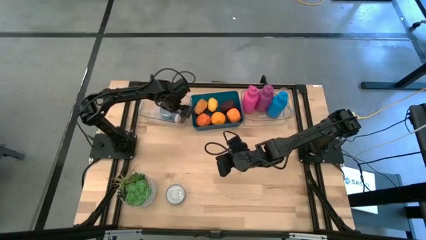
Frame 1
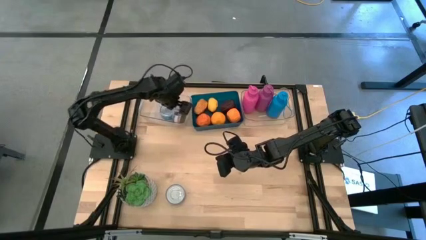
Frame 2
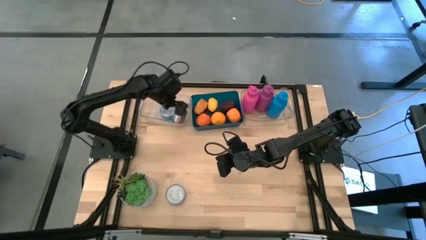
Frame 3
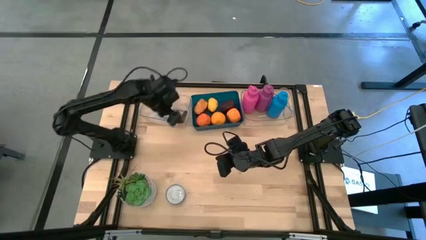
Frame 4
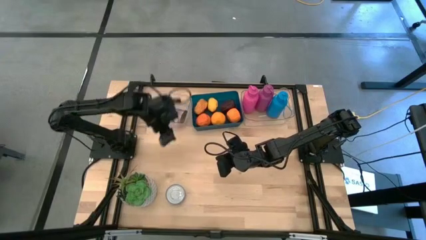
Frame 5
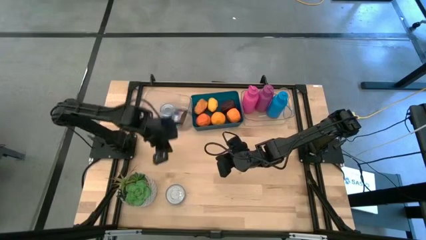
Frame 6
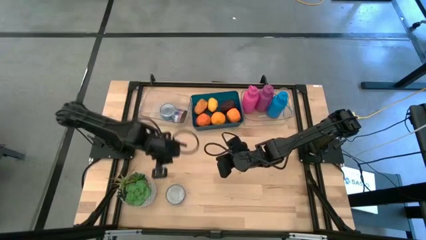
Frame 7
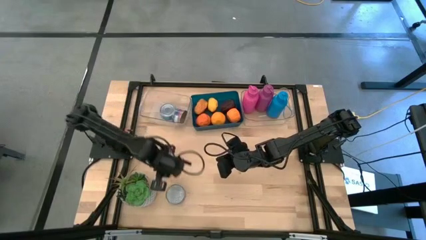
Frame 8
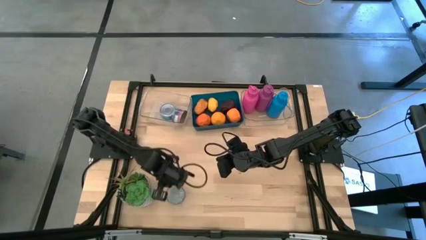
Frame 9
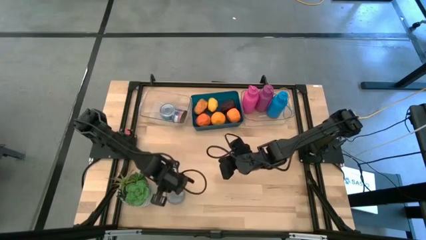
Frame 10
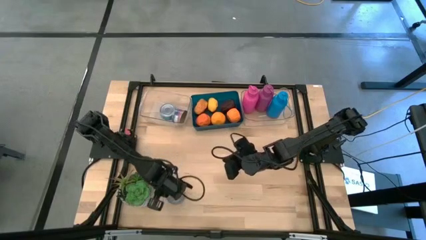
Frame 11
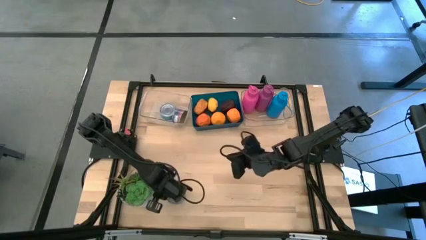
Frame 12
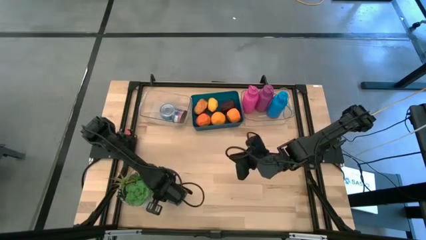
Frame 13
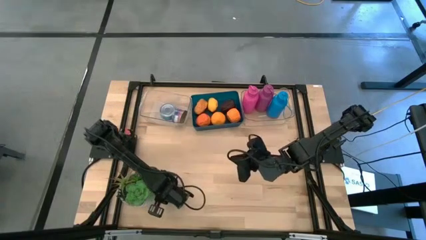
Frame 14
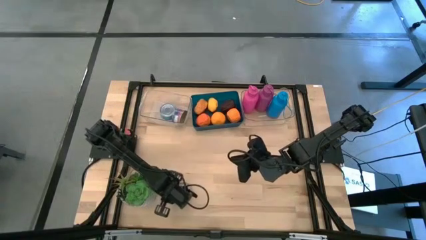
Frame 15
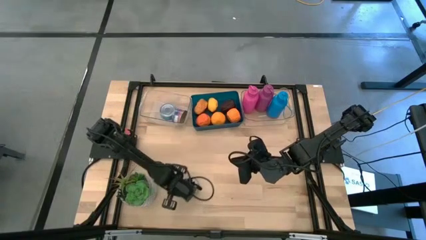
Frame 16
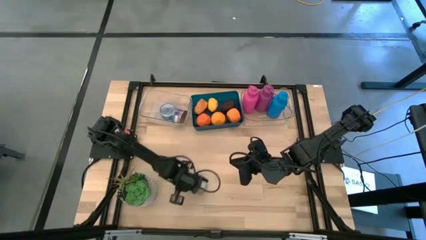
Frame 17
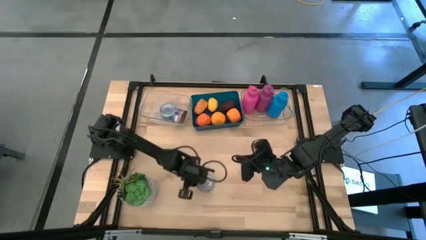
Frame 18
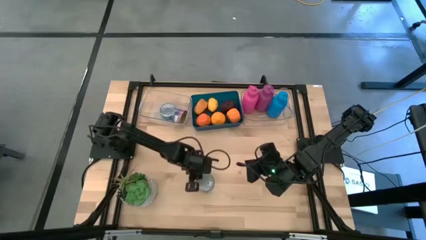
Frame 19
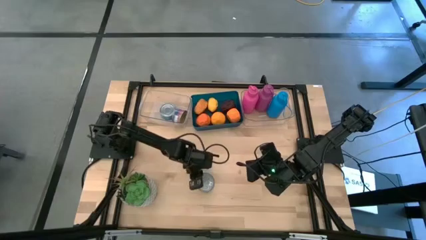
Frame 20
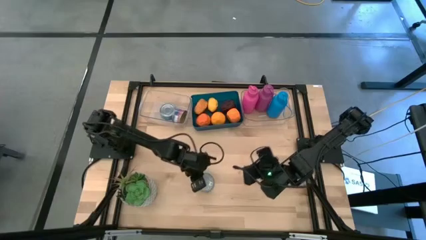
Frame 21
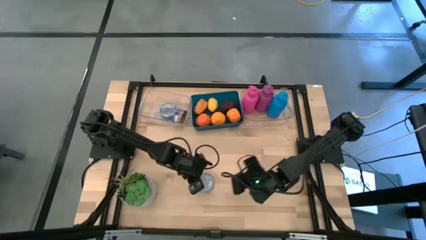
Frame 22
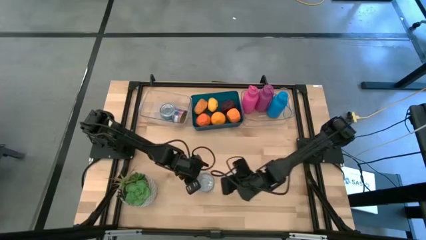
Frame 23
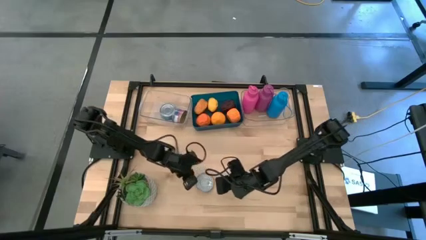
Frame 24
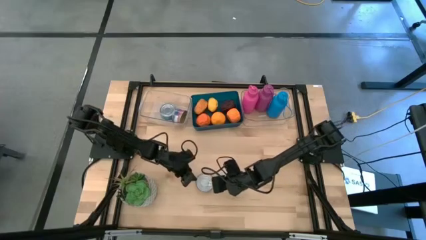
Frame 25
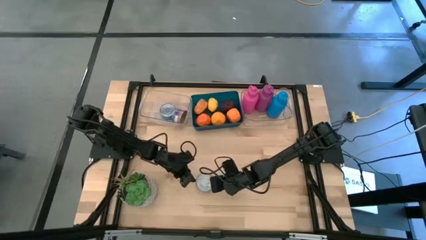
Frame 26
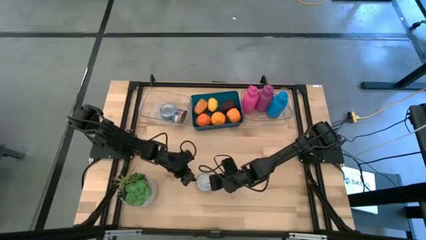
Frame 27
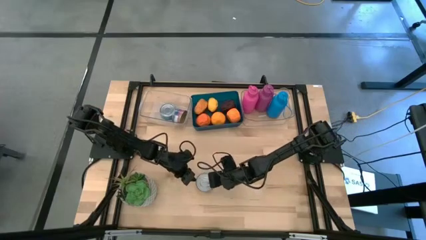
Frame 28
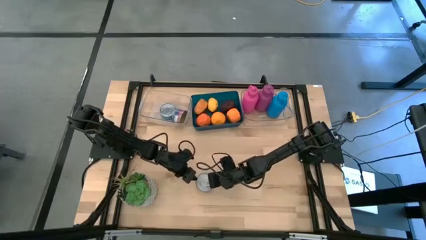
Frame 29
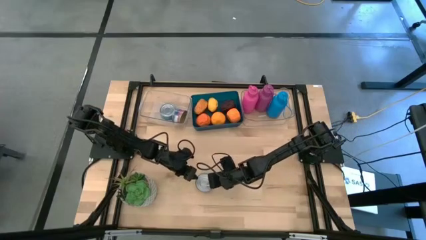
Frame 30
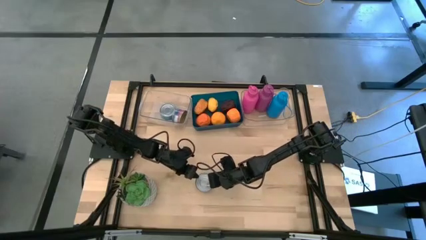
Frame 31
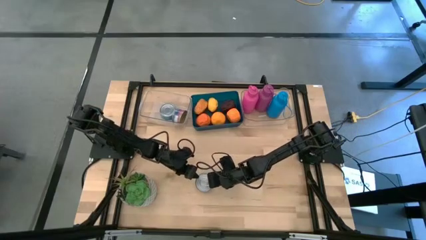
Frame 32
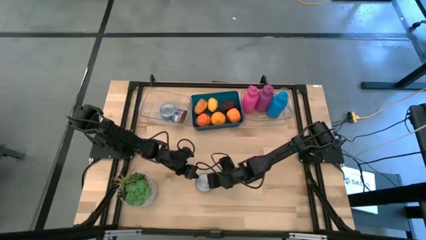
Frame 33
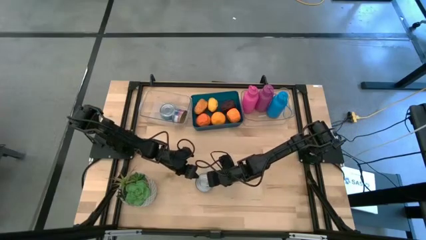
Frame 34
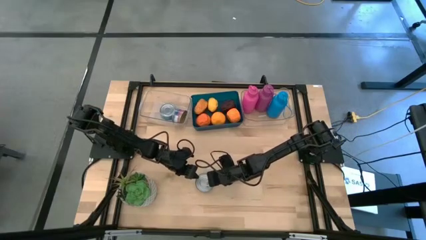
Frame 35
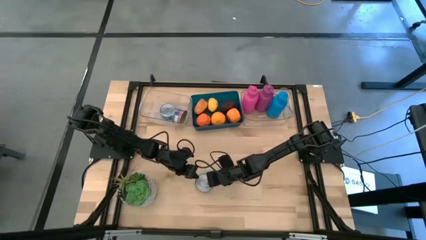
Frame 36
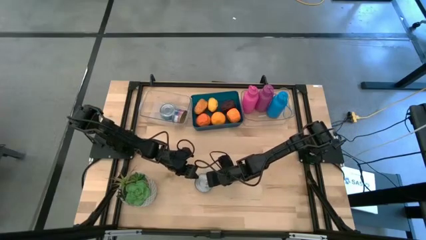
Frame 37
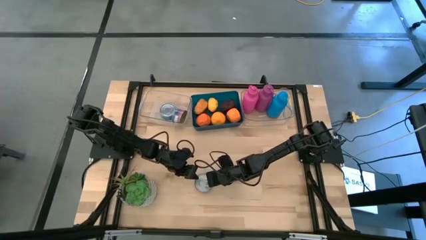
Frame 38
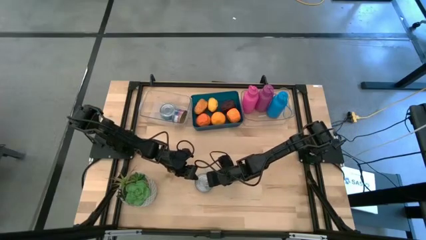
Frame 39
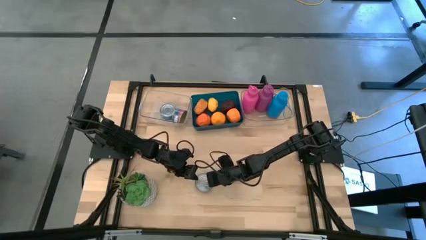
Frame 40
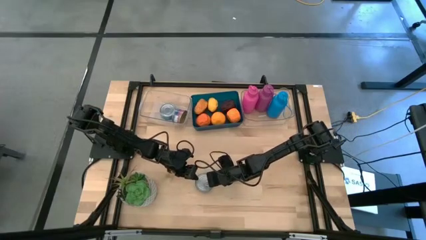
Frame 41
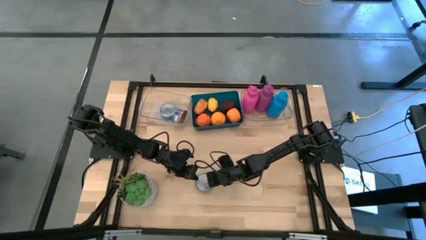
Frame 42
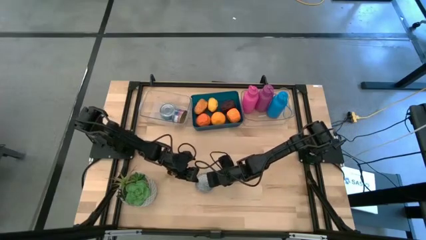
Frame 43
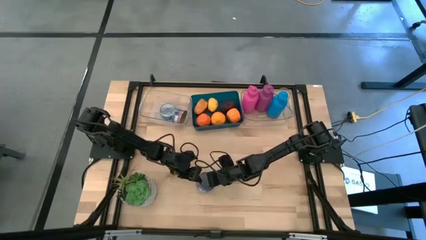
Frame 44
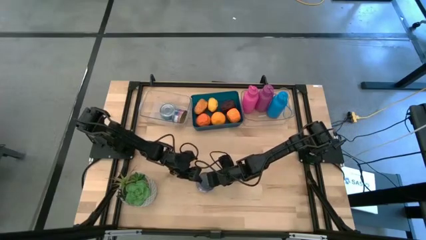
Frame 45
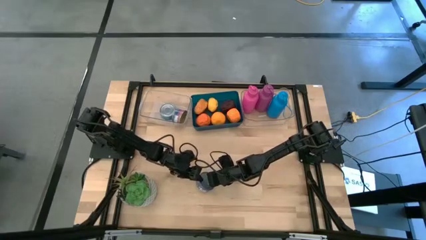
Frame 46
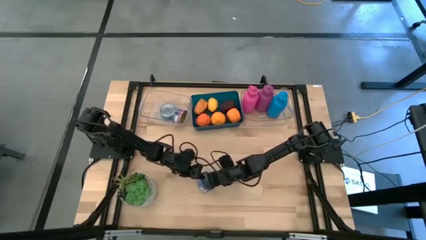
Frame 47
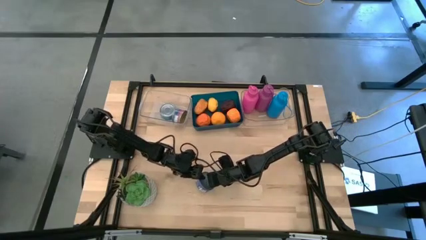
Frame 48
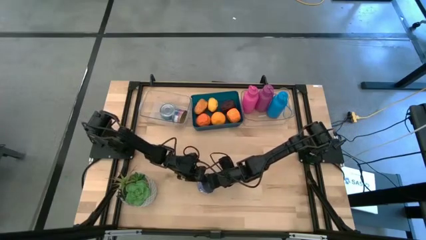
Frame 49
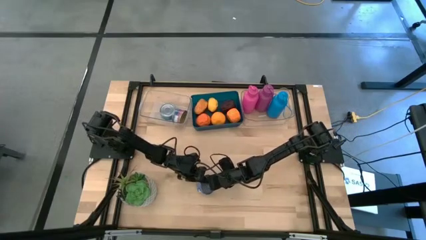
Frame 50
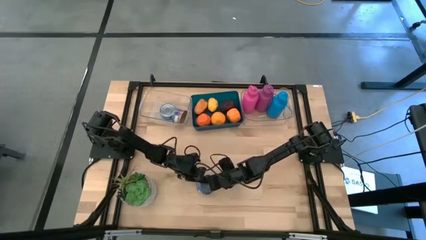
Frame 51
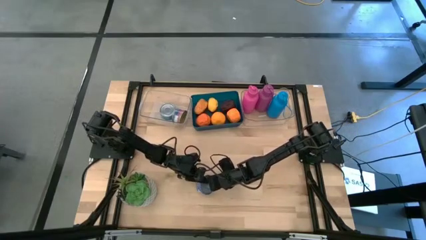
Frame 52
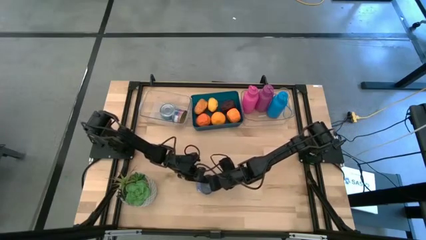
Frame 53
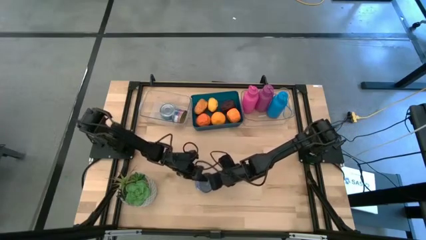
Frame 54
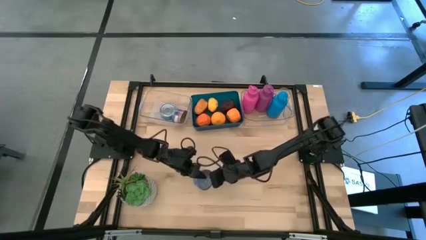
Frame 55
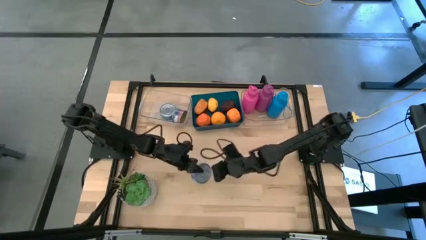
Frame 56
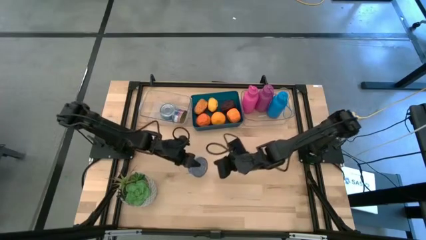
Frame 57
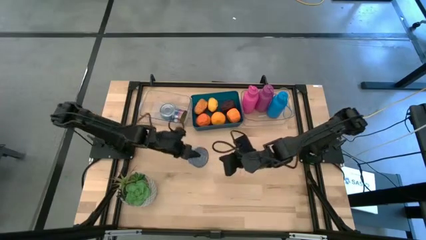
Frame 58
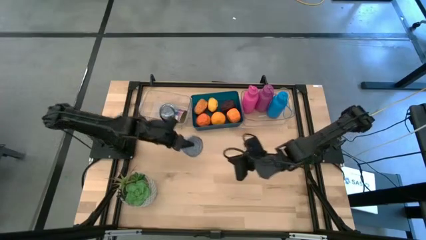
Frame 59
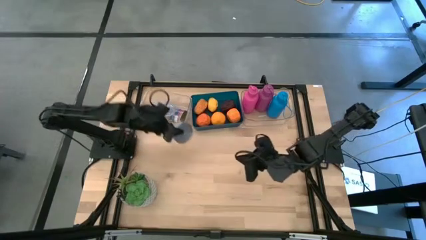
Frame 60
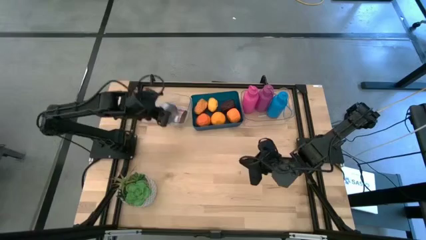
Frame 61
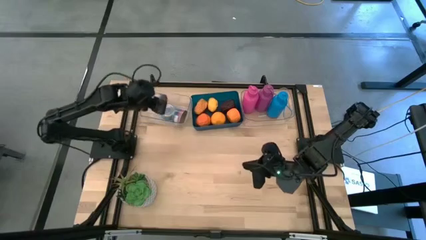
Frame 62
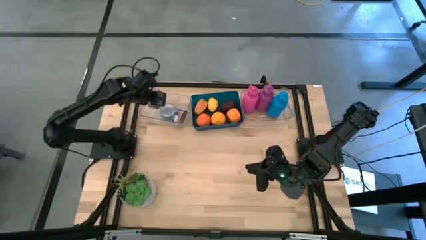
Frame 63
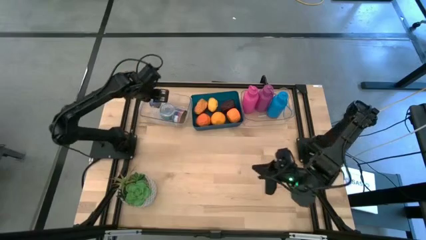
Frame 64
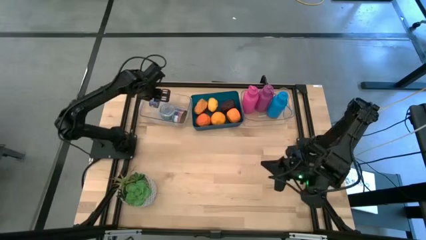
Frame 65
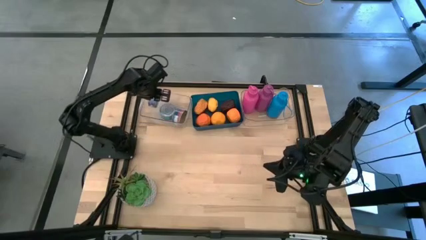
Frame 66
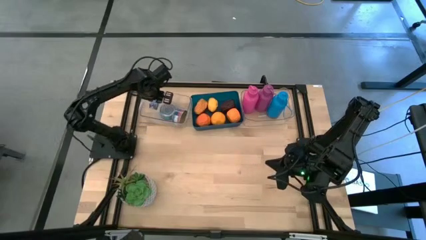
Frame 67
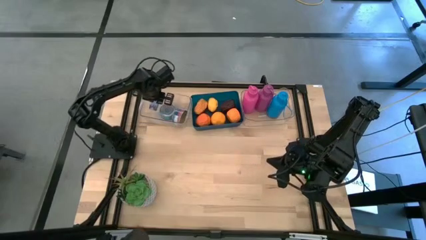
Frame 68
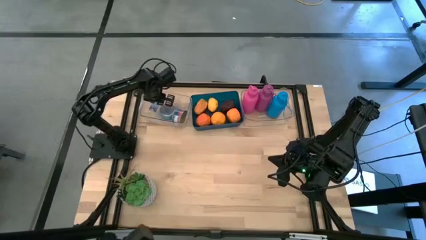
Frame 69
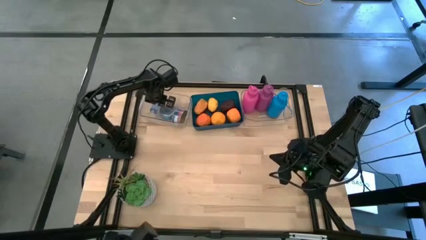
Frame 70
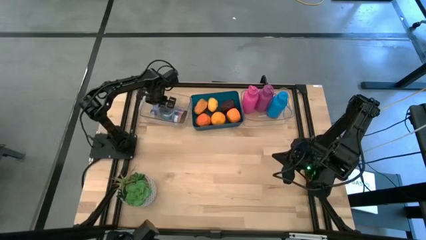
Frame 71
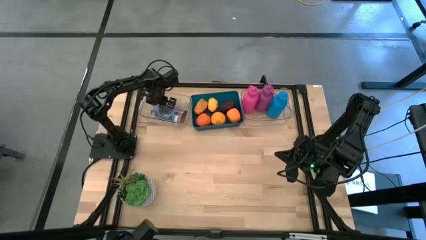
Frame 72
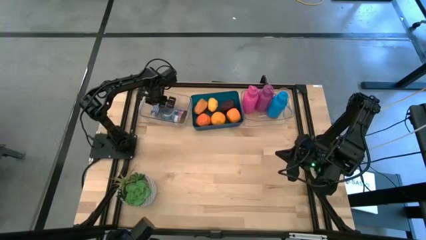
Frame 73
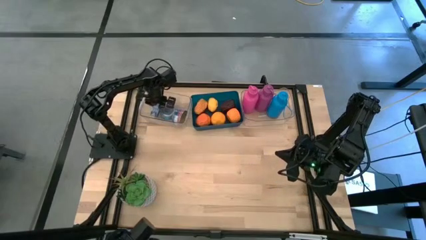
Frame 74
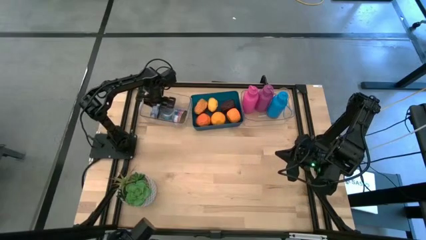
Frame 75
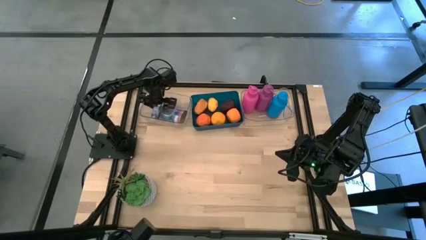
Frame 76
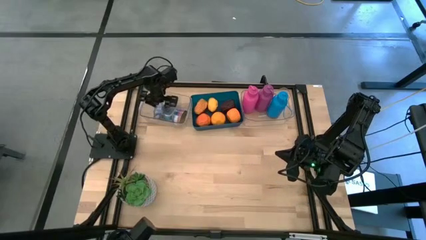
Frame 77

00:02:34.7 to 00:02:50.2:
Task: Pick & Place Food Item
Put the blue tuna can into the left transparent bin
